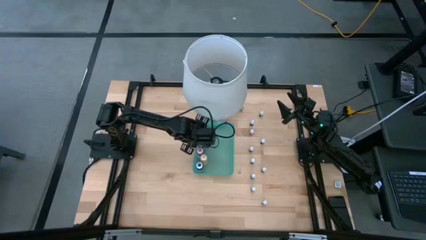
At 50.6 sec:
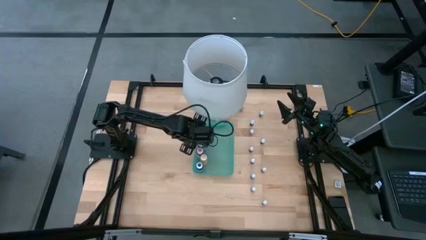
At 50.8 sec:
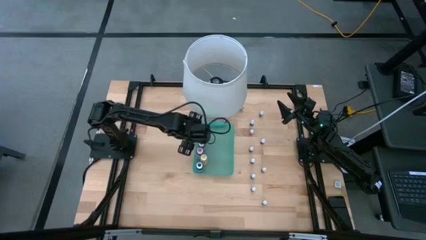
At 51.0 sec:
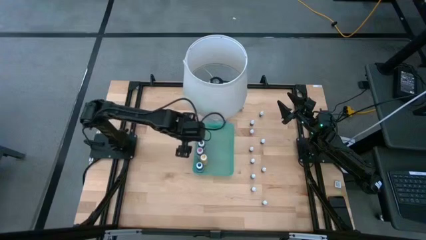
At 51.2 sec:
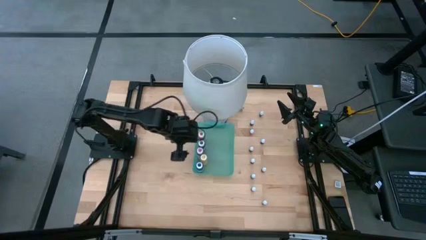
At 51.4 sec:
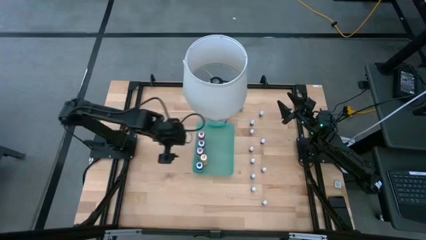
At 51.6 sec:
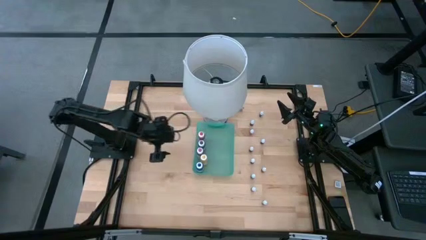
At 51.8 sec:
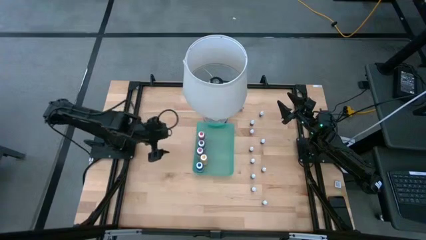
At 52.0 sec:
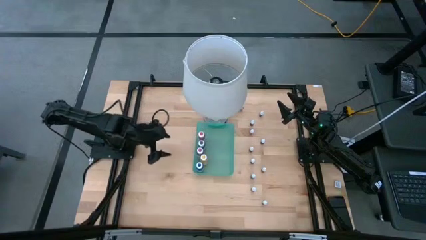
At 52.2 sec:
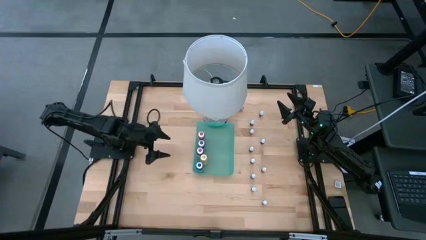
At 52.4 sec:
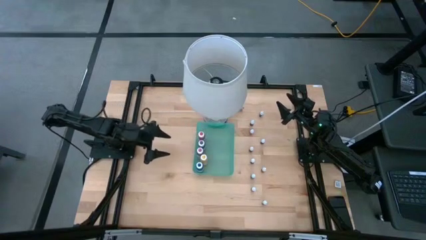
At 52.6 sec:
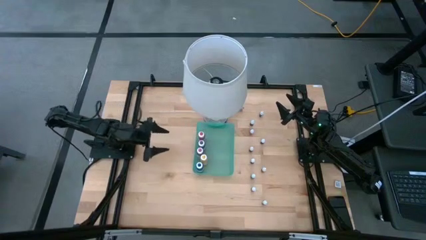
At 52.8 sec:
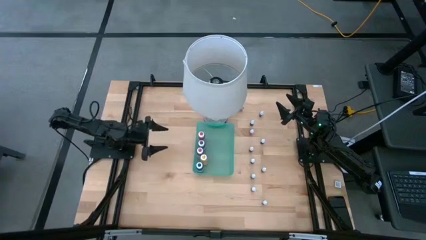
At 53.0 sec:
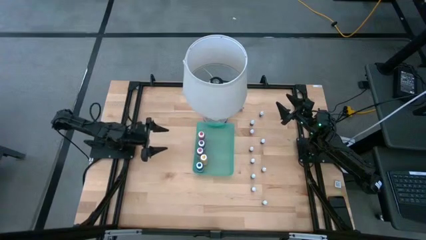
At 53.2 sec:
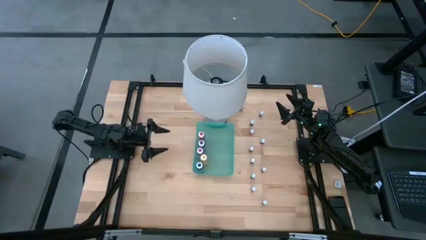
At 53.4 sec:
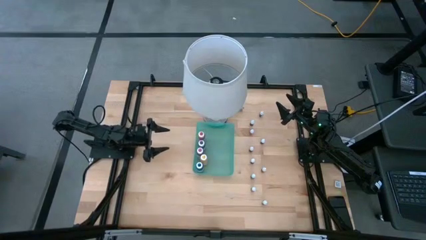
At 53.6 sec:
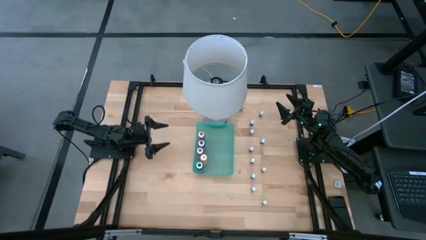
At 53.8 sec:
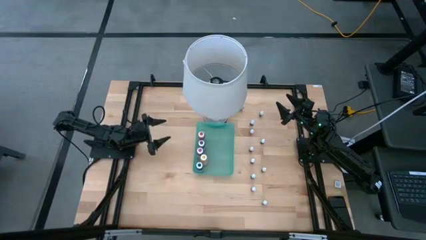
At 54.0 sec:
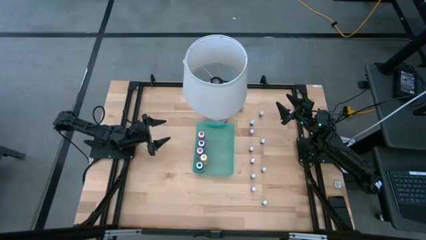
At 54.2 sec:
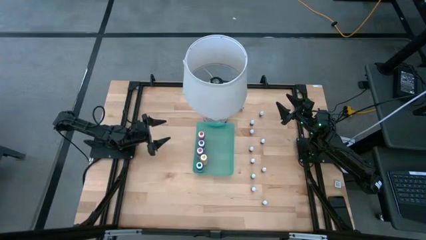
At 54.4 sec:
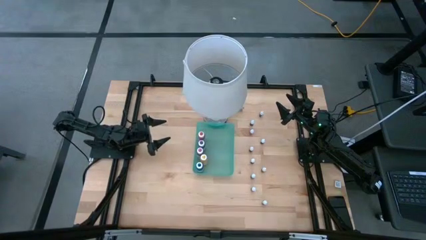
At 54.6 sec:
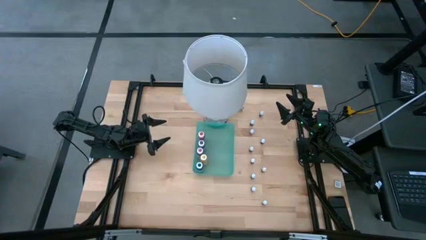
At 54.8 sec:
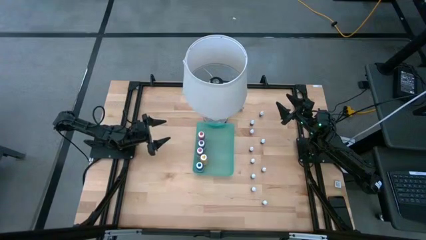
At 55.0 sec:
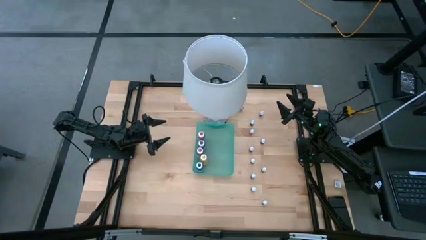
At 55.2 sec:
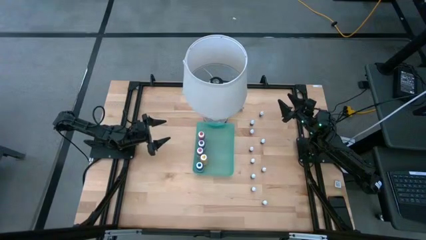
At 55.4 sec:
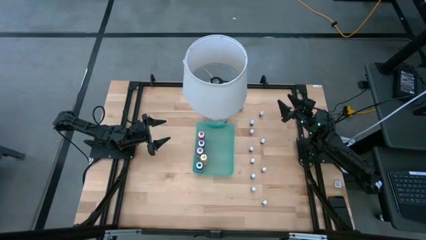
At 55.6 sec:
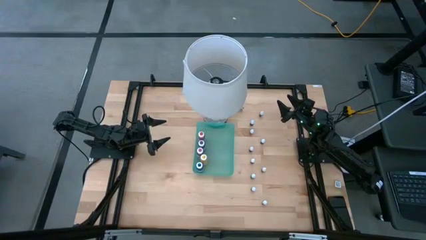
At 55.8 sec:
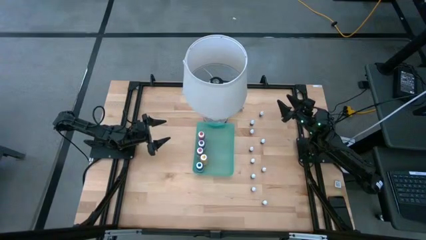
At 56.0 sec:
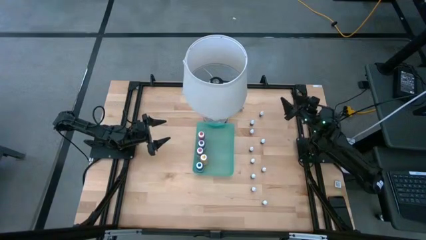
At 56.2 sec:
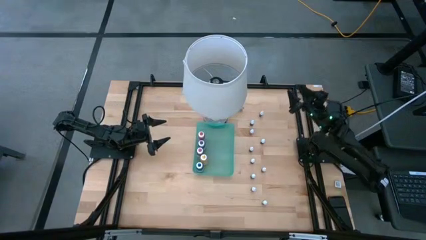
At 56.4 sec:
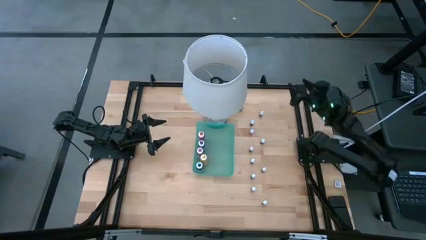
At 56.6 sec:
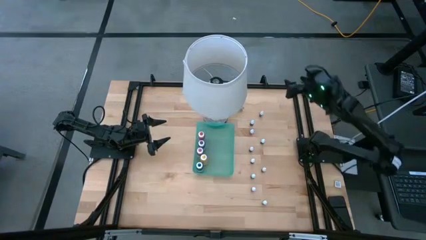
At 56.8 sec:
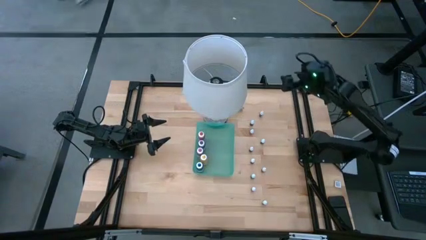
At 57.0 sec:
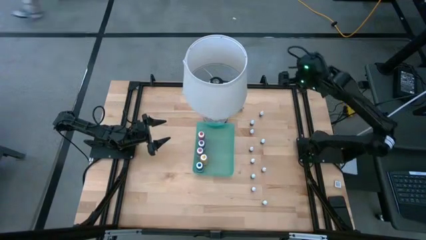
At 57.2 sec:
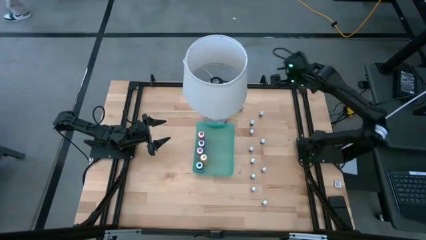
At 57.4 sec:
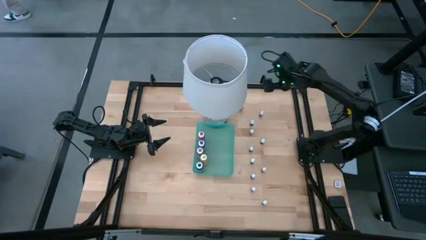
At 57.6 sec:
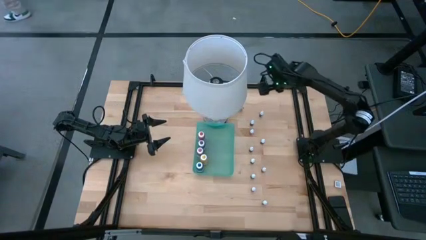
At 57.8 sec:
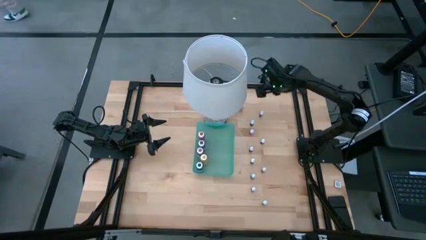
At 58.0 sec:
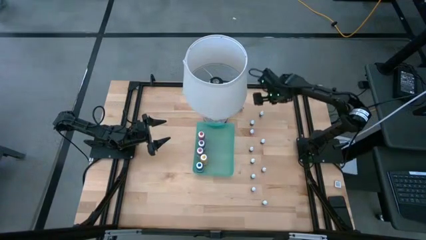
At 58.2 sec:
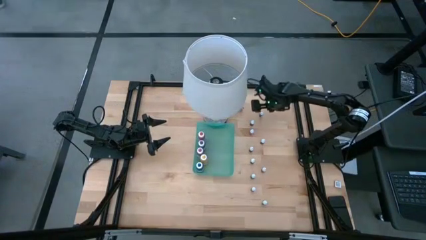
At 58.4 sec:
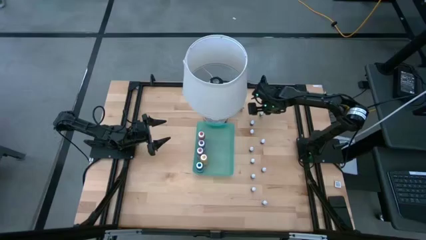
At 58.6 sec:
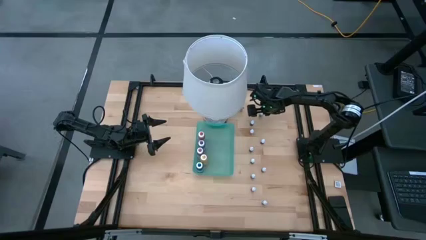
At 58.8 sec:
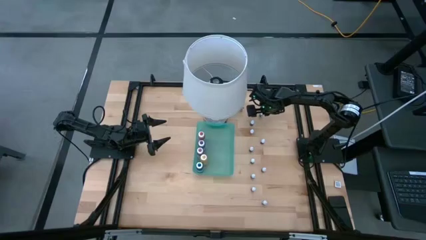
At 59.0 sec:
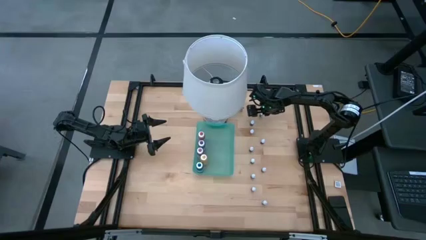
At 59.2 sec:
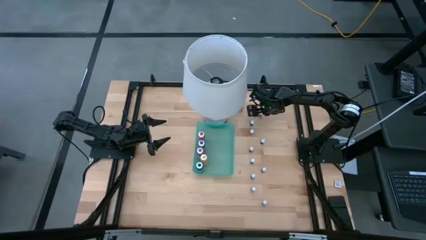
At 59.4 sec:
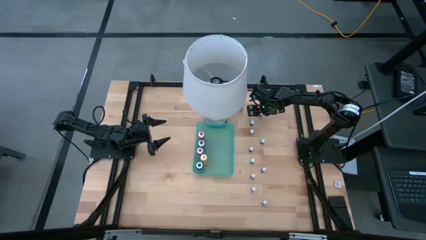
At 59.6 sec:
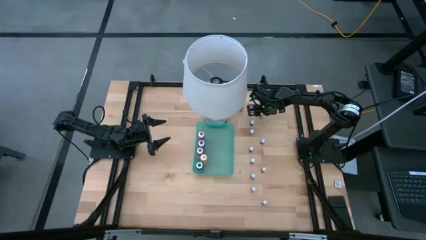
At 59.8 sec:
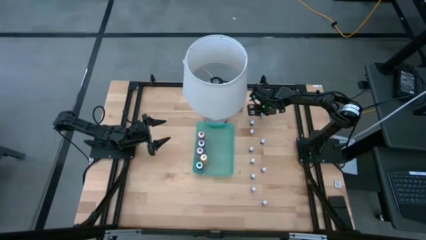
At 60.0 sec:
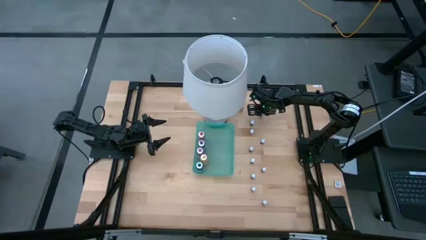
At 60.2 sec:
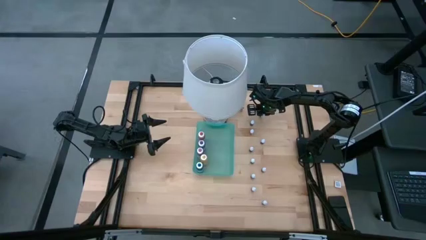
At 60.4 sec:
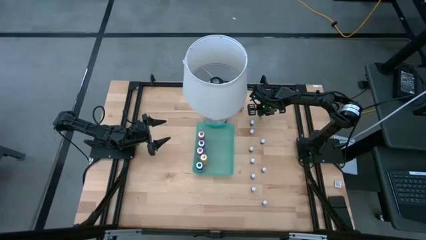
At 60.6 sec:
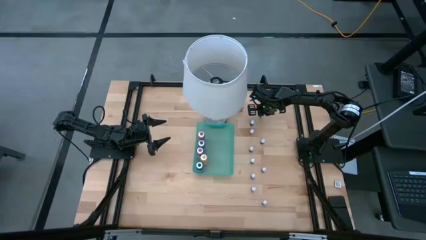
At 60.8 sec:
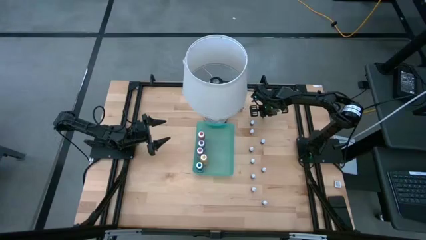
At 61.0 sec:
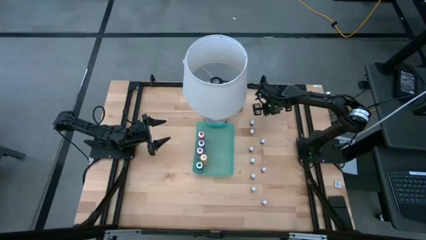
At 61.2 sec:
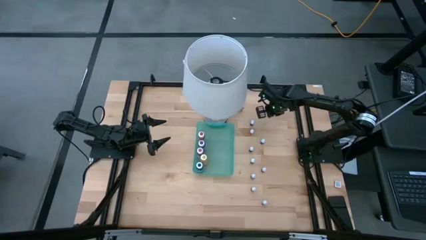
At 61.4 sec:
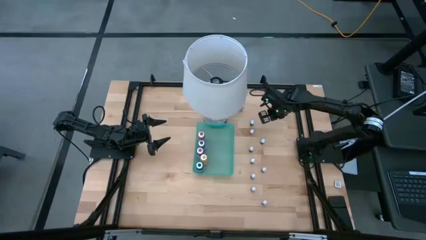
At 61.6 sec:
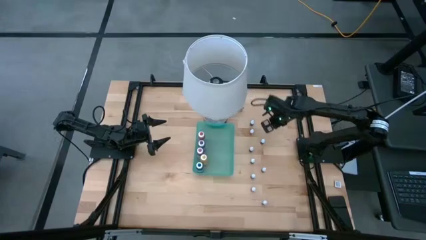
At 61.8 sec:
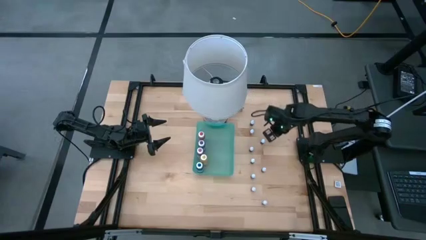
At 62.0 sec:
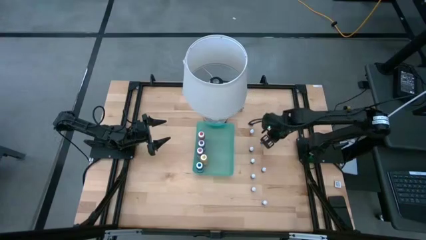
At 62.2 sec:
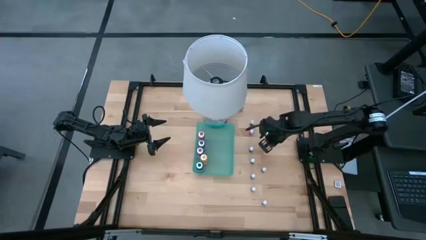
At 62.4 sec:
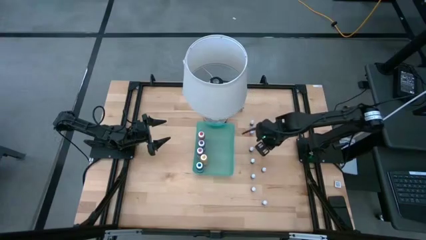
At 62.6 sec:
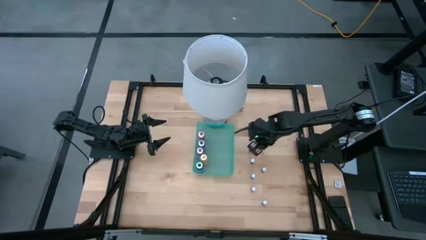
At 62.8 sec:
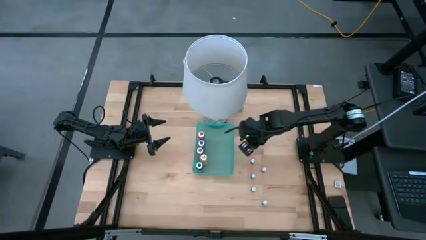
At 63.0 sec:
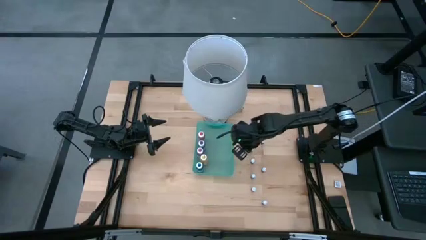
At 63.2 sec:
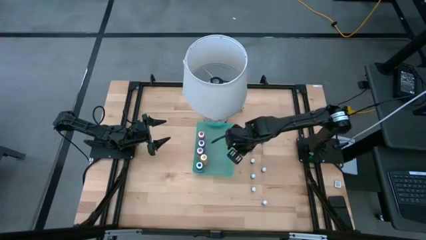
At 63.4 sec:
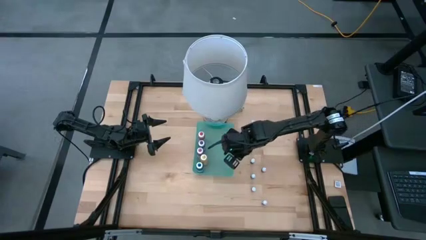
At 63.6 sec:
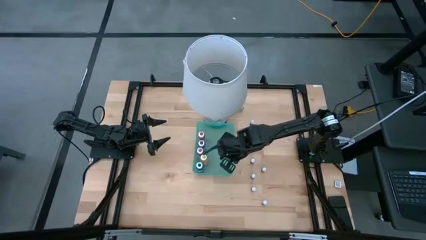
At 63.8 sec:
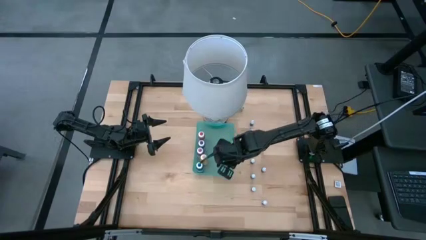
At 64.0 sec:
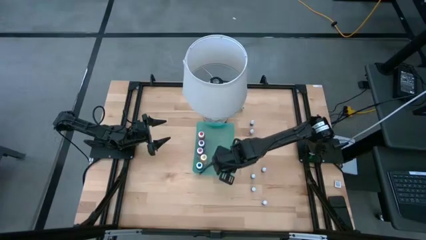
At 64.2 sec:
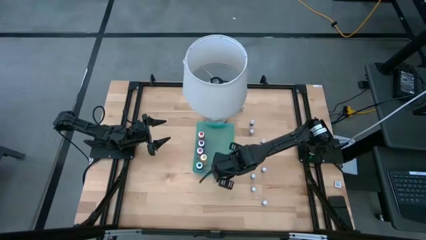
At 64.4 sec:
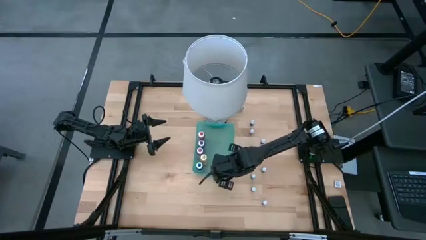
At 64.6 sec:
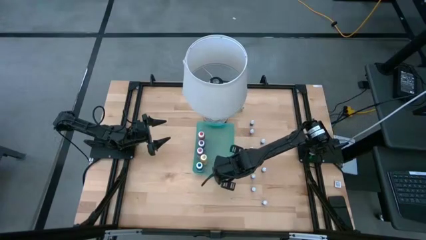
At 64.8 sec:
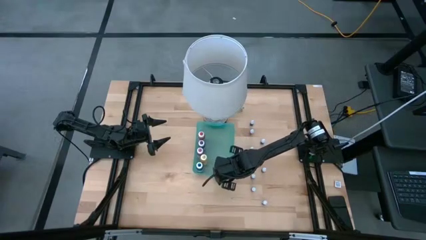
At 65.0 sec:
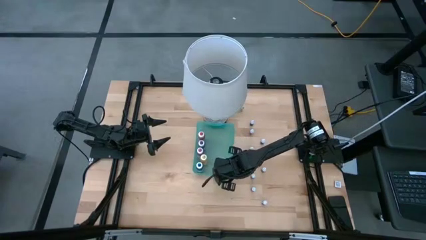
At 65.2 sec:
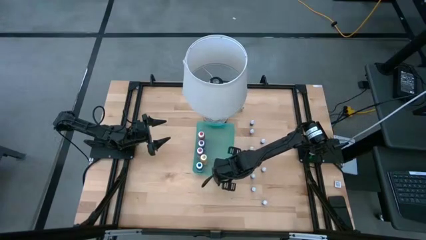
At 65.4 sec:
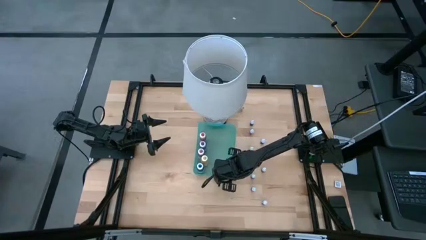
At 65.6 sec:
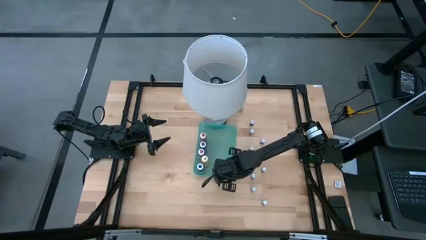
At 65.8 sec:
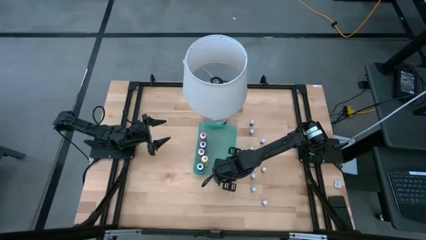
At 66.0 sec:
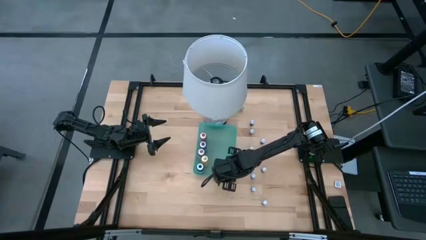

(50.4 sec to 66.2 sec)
Task: Pick & Place food coloring
Put the small green food coloring bottle into the green bin

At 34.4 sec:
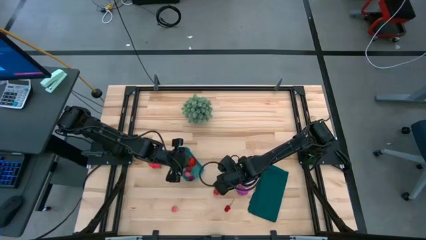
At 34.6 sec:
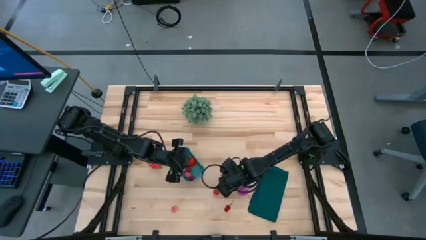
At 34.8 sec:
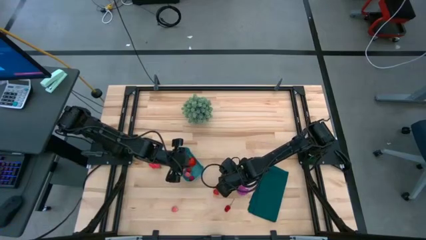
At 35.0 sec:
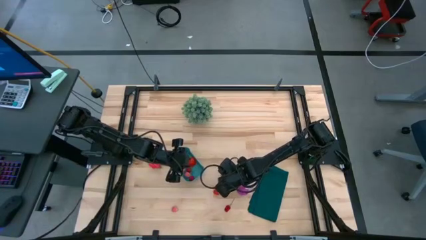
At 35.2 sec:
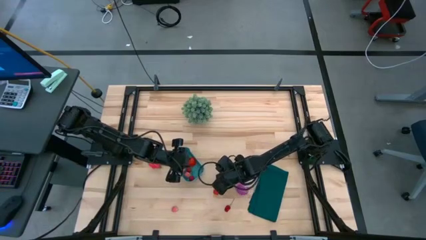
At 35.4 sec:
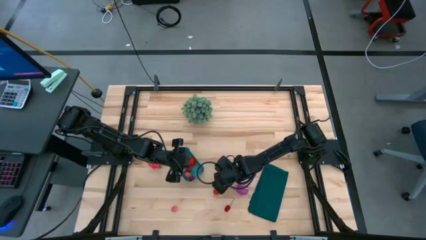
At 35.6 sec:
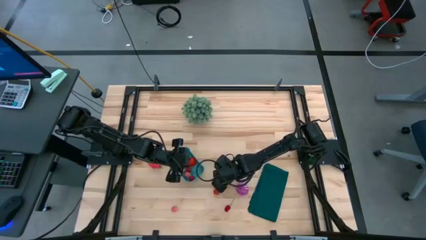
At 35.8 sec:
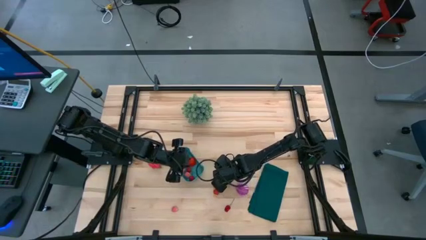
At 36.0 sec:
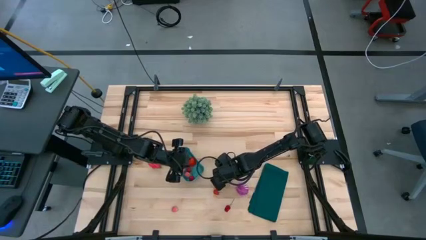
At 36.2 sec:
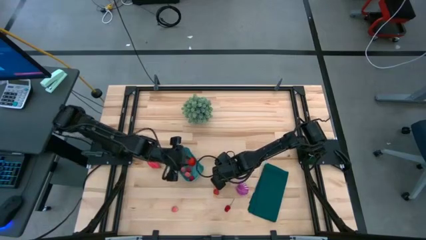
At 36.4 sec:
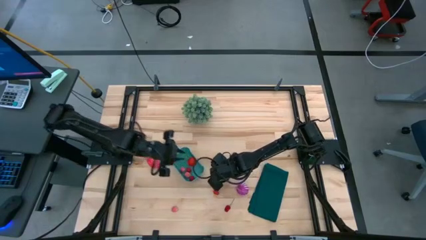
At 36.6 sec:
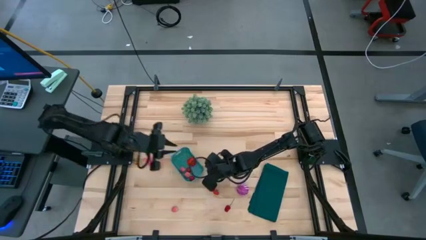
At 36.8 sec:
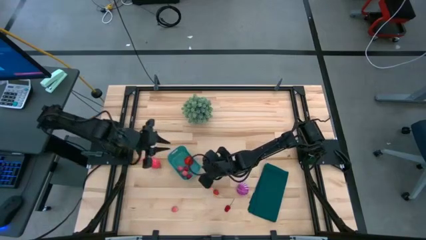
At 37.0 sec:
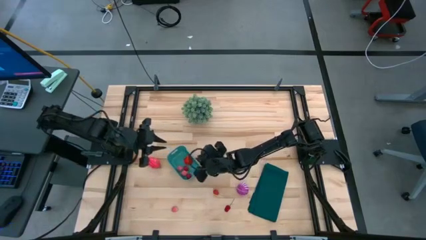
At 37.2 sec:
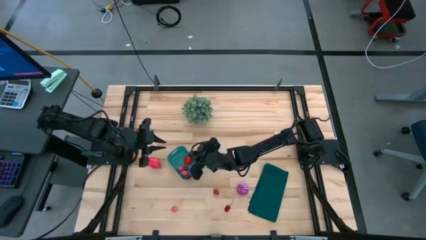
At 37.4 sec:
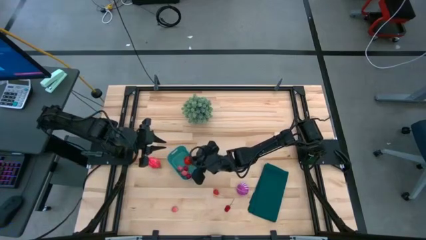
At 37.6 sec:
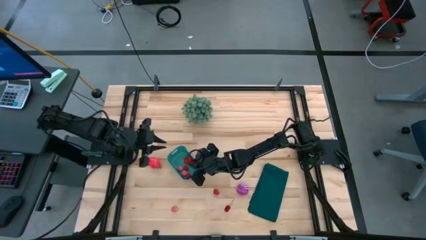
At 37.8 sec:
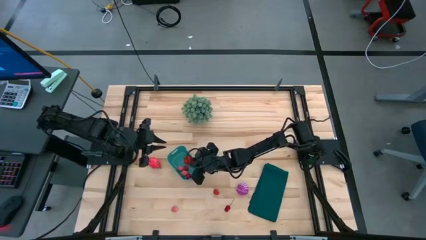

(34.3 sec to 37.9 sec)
Task: Pick and placing Produce into tupperware
Put the red cherry into the green bin
